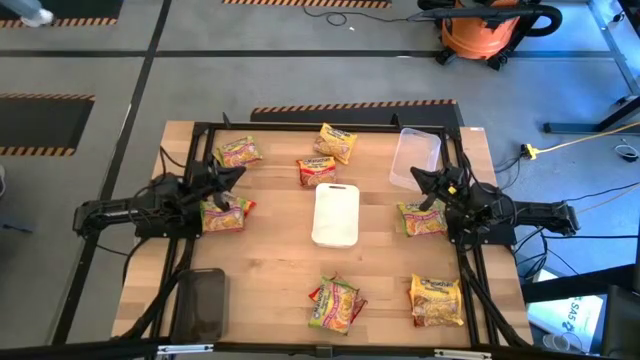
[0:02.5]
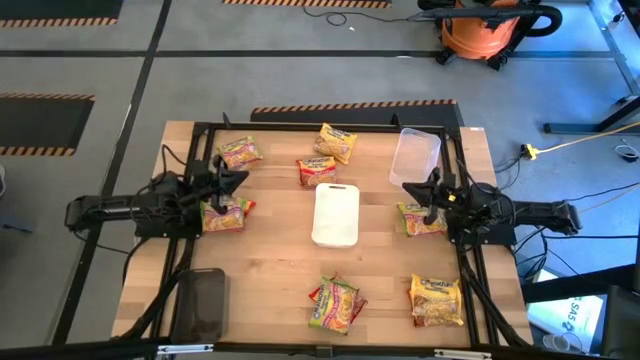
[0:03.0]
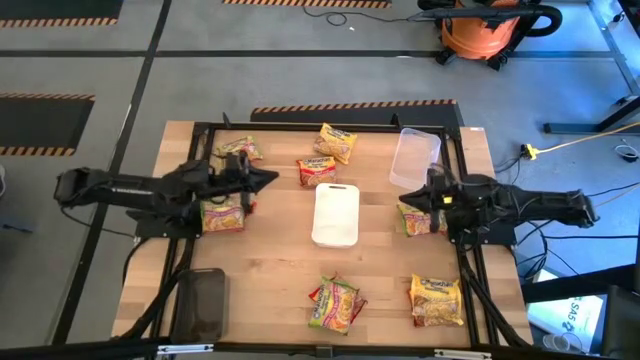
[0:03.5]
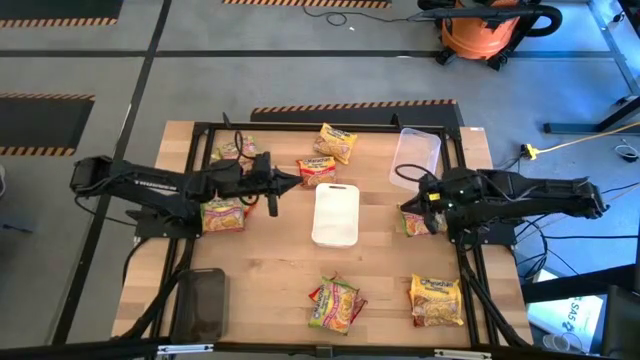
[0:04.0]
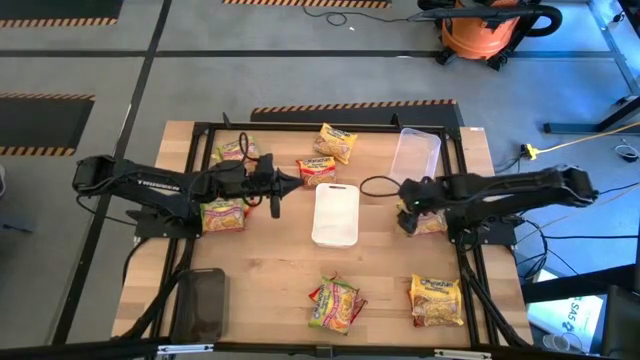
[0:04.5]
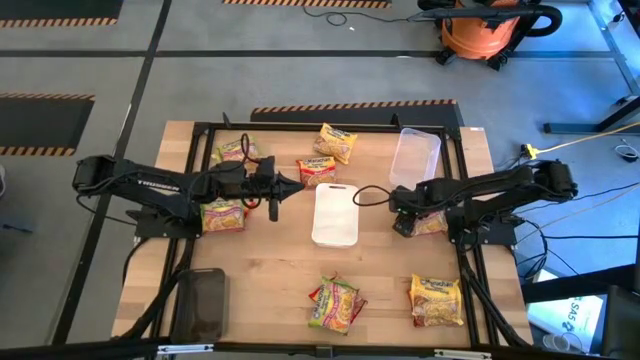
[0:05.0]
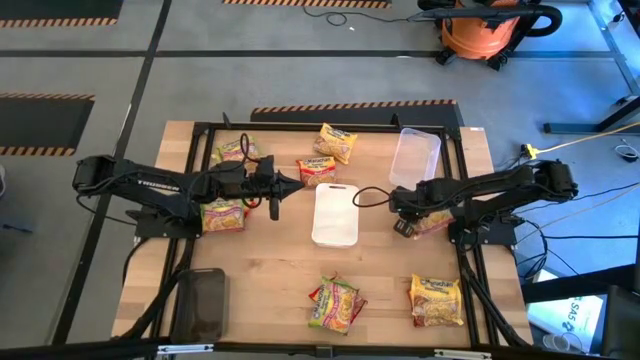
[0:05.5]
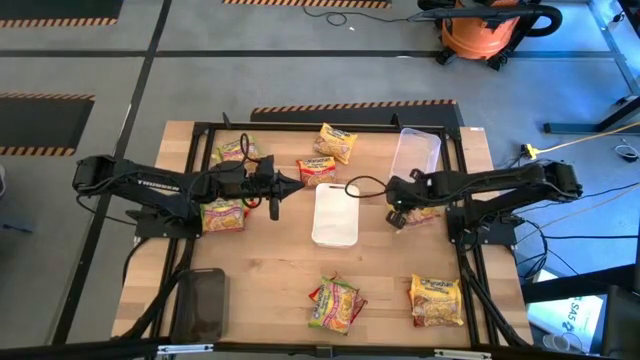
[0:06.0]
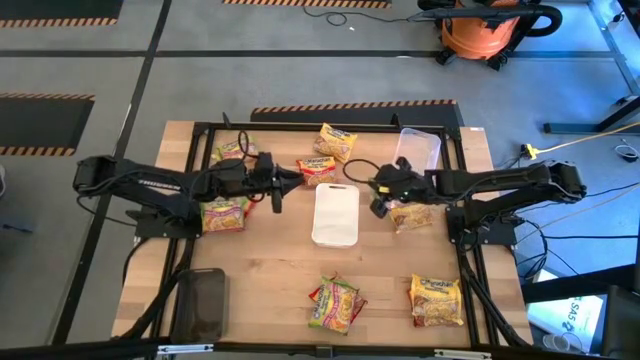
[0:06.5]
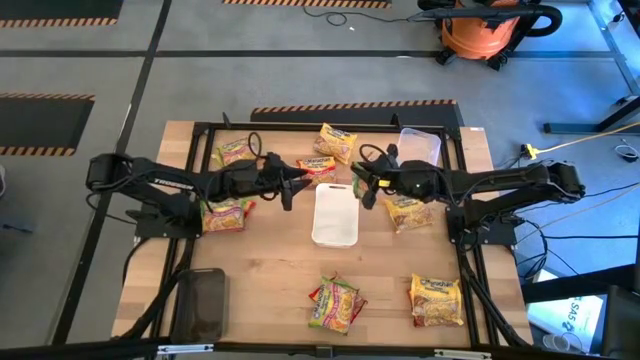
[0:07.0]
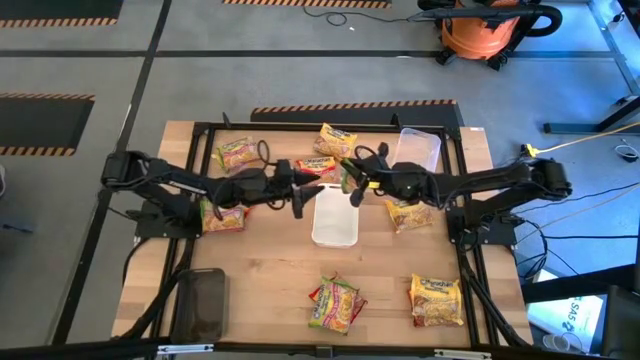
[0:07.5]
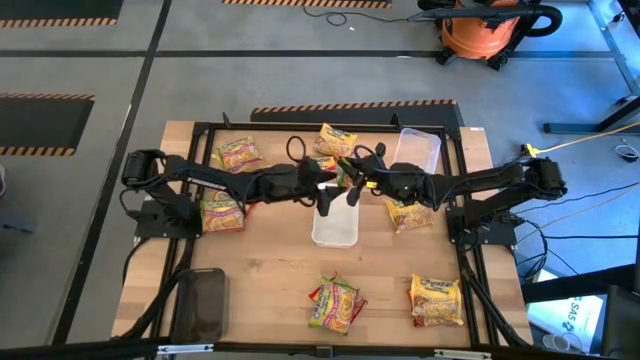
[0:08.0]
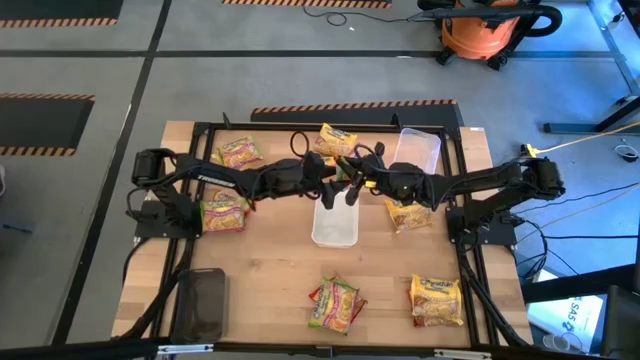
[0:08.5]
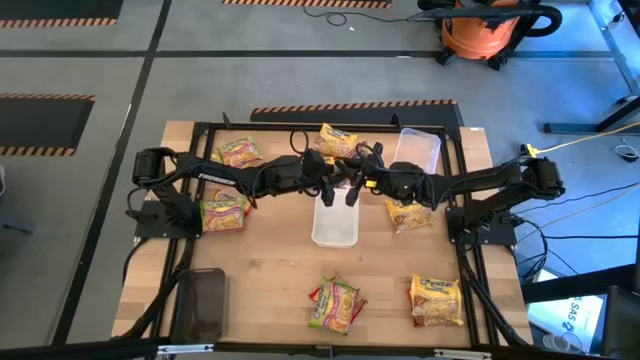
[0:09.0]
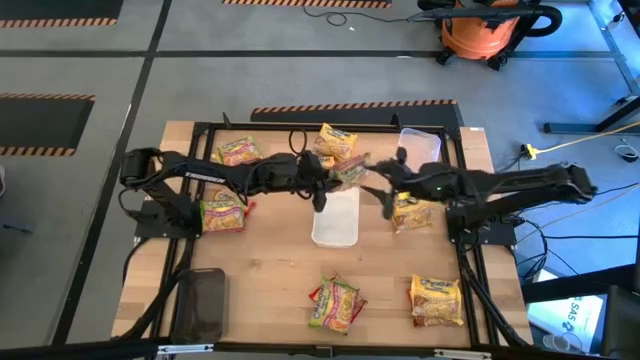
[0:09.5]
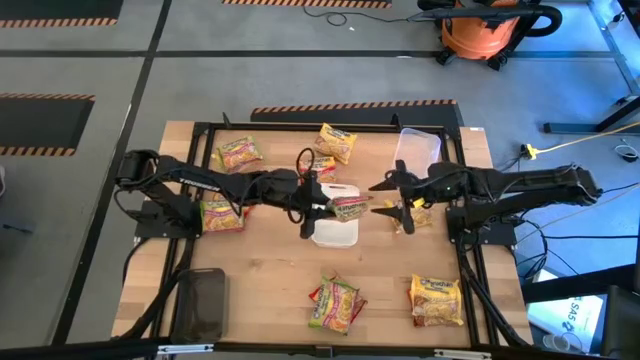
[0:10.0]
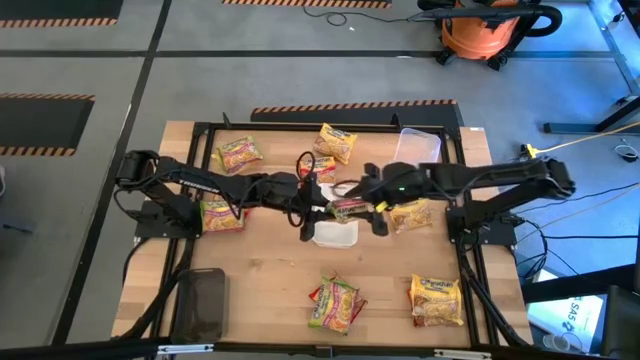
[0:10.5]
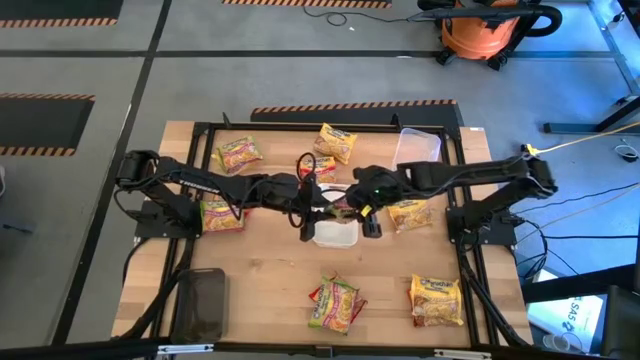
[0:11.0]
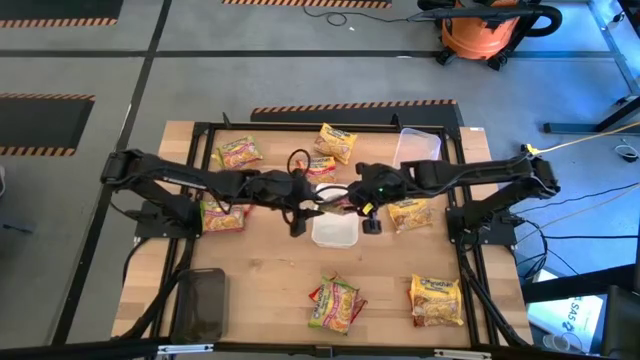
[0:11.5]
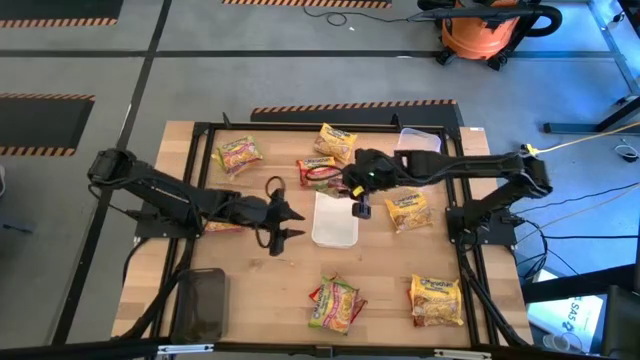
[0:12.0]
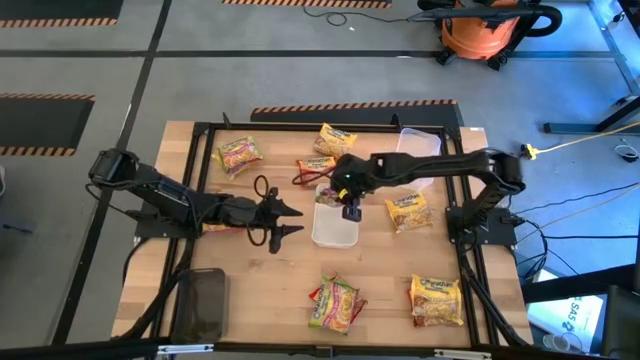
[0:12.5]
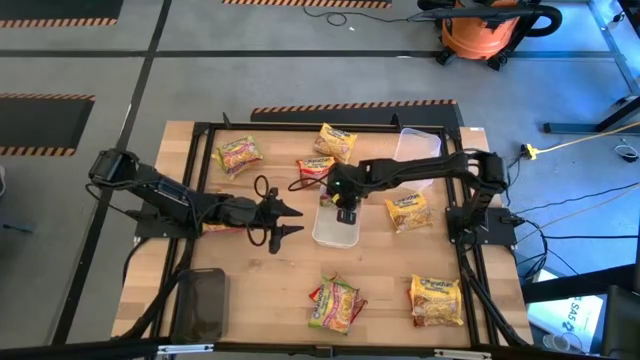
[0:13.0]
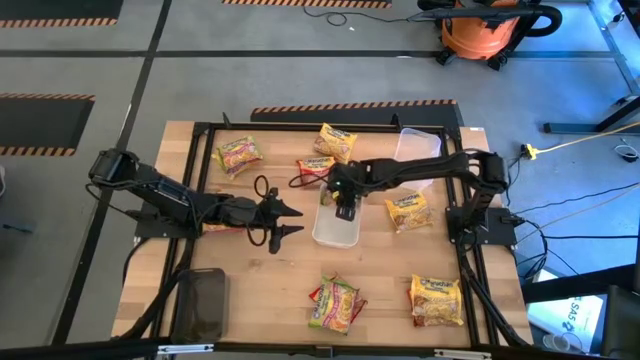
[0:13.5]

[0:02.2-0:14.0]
Task: Sort Maruchan noodles
Put the green noodle pack into the white bin

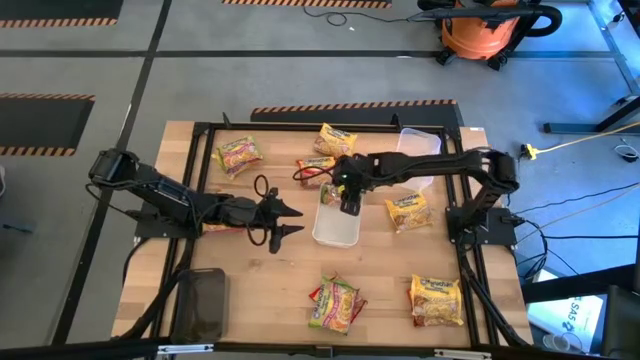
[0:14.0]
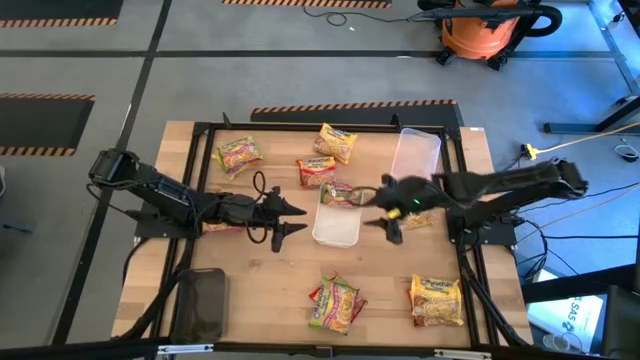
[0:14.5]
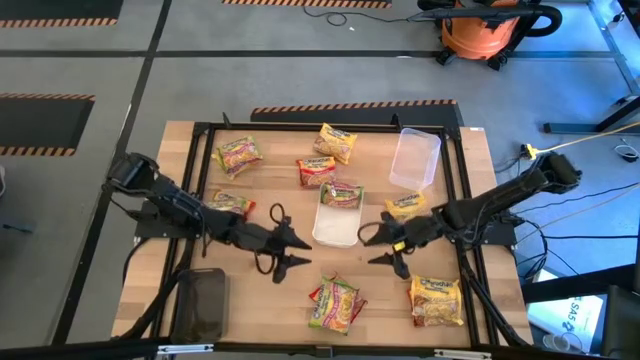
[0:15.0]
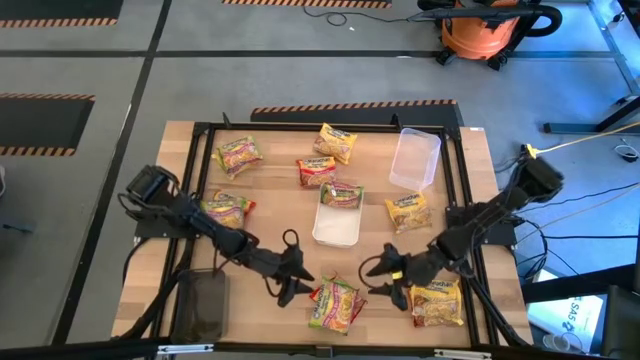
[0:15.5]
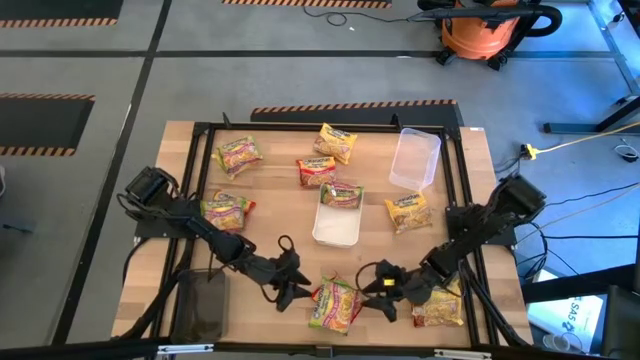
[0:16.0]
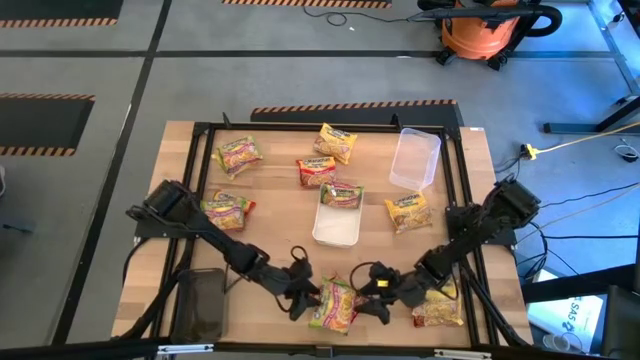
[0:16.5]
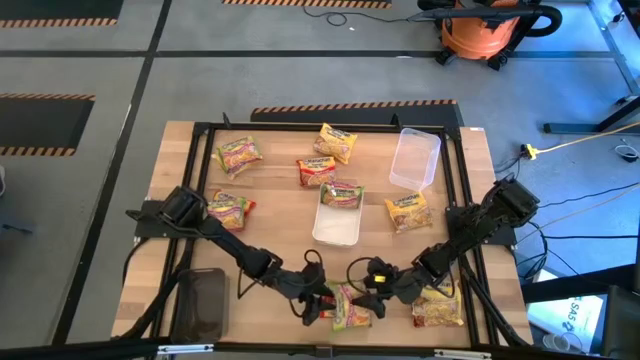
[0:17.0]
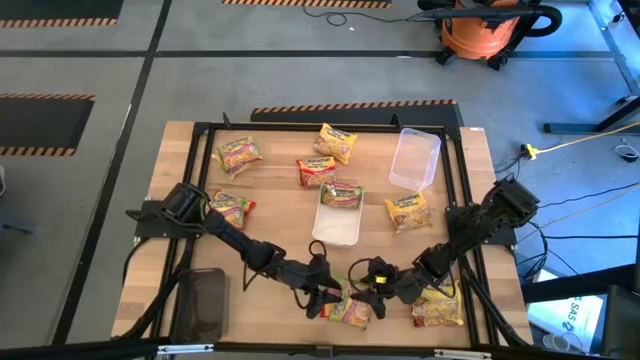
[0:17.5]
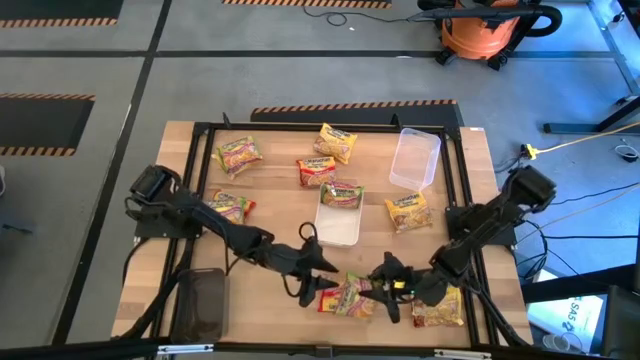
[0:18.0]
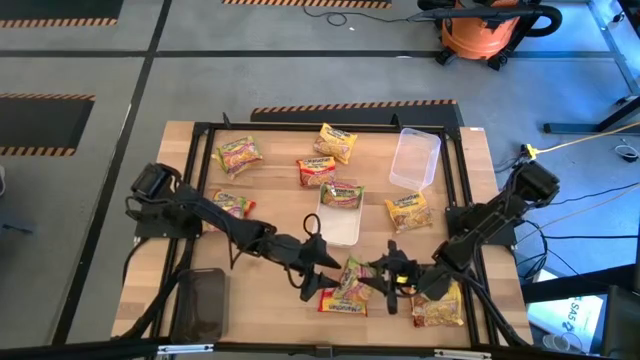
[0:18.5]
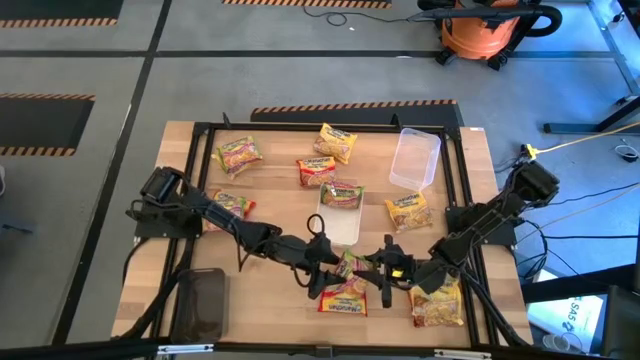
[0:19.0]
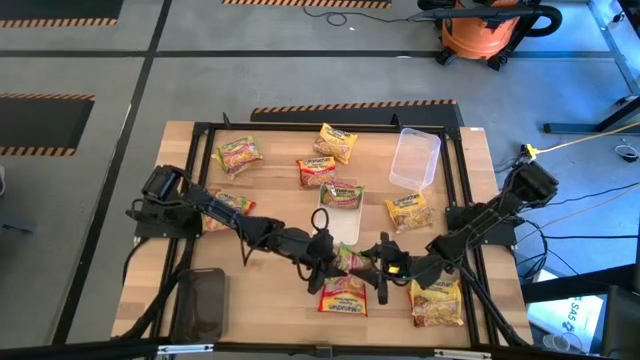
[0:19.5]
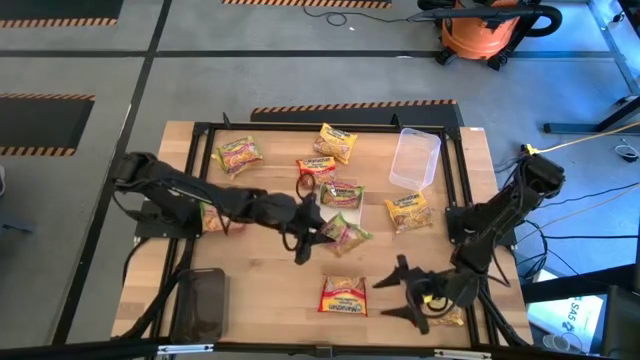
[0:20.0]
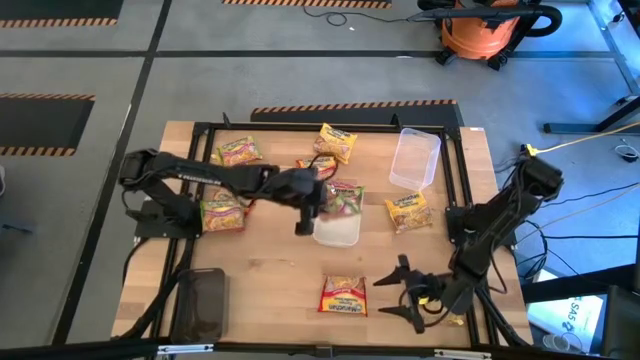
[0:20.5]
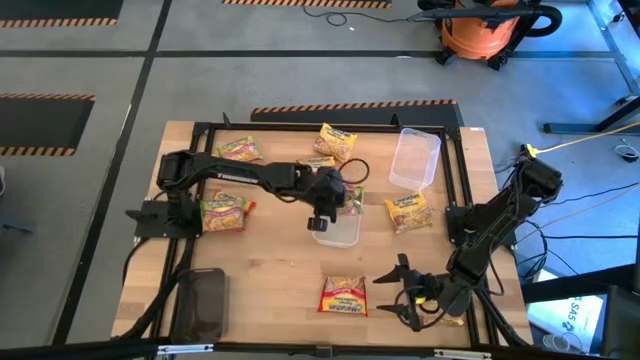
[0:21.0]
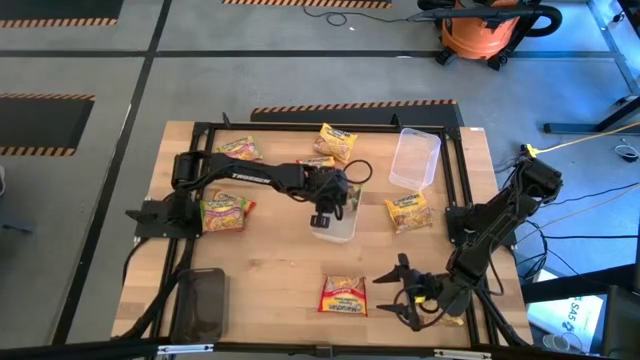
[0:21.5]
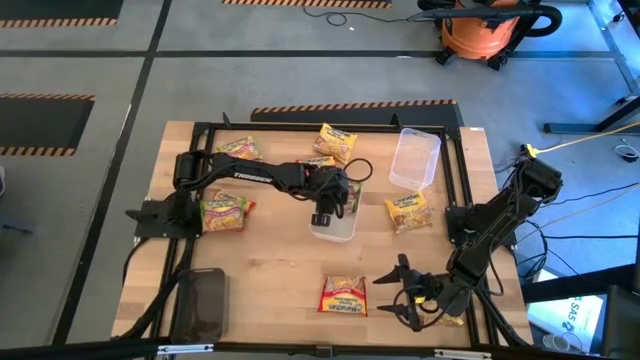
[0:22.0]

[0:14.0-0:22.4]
Put the green noodle pack into the white bin

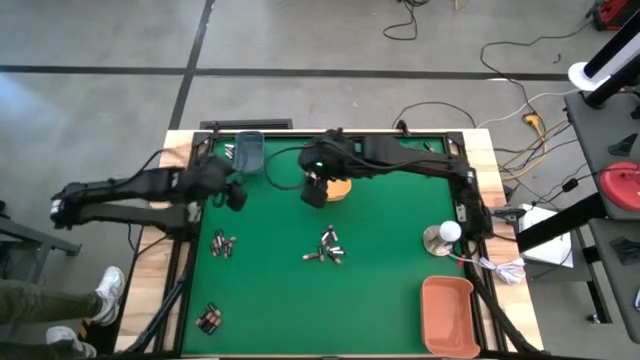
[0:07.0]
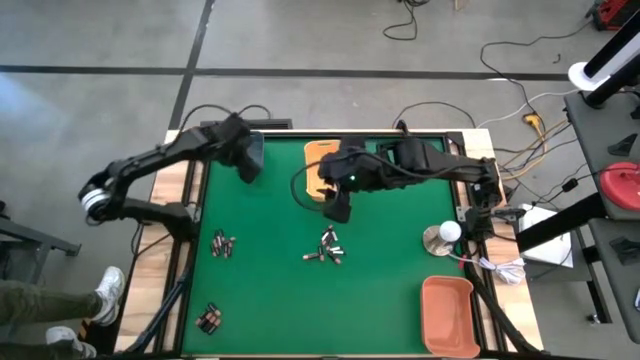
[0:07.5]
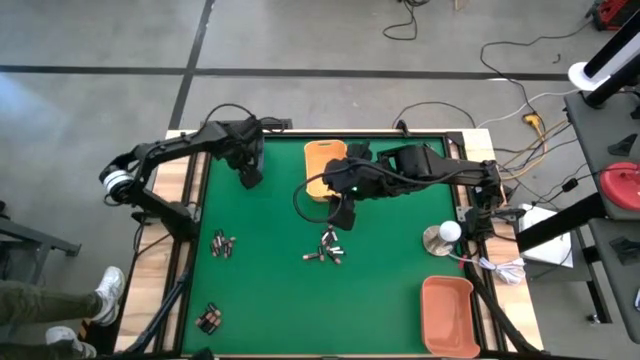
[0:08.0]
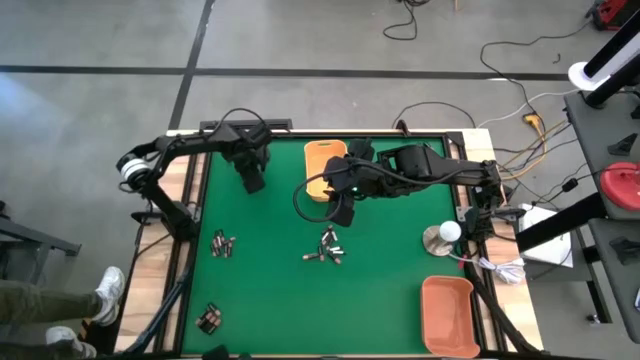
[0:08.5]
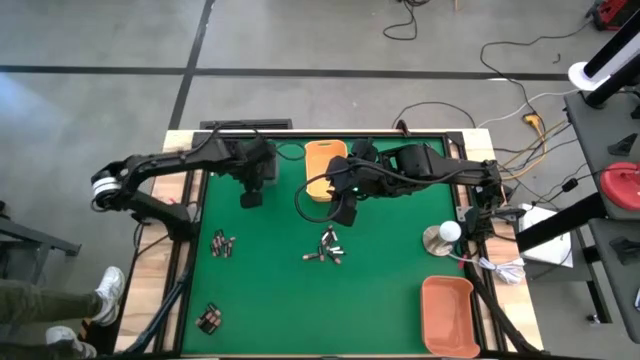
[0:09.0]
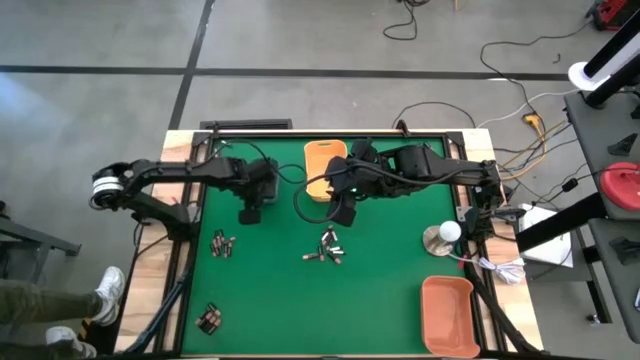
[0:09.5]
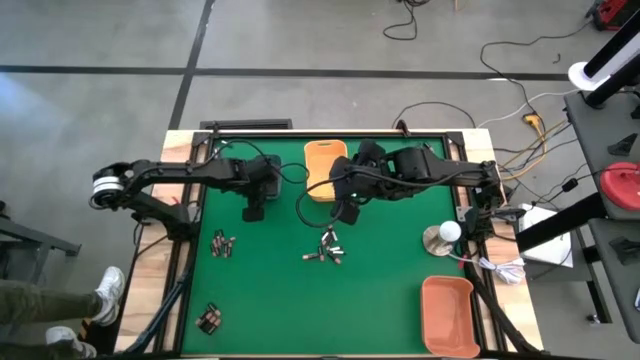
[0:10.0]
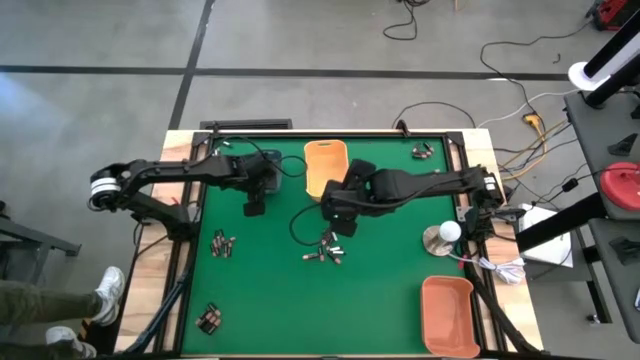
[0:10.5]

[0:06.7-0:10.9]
Task: Sort batteries
Adjust the blue bin
